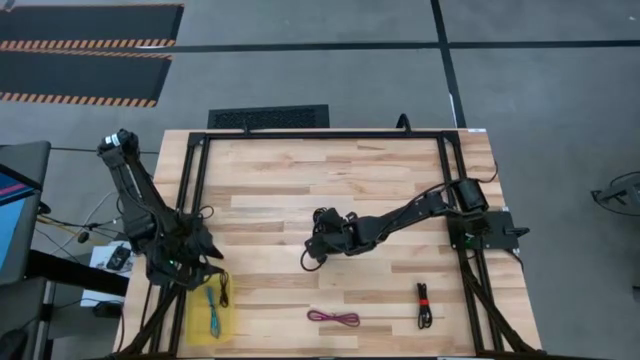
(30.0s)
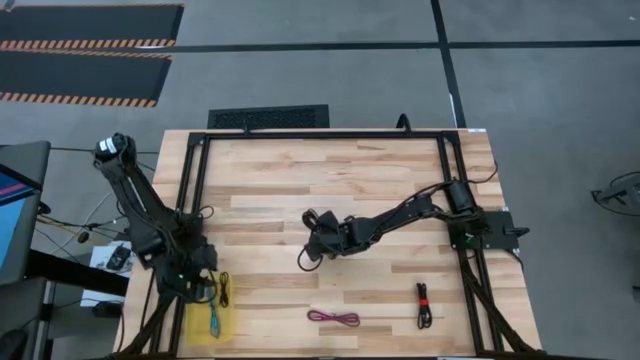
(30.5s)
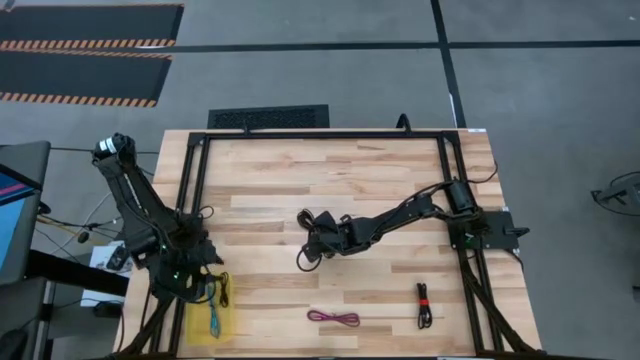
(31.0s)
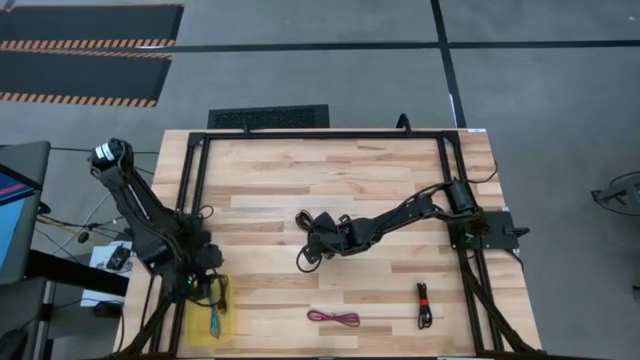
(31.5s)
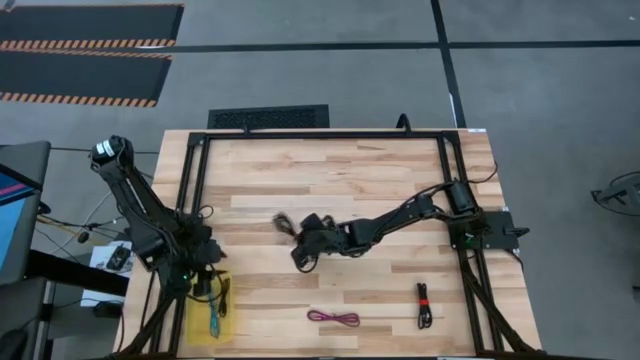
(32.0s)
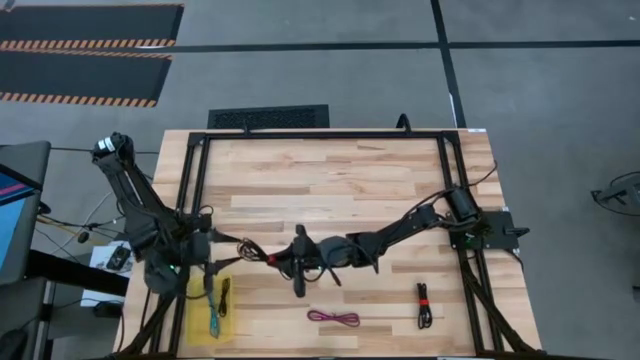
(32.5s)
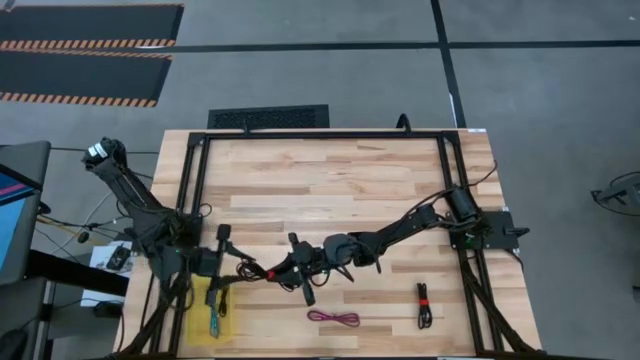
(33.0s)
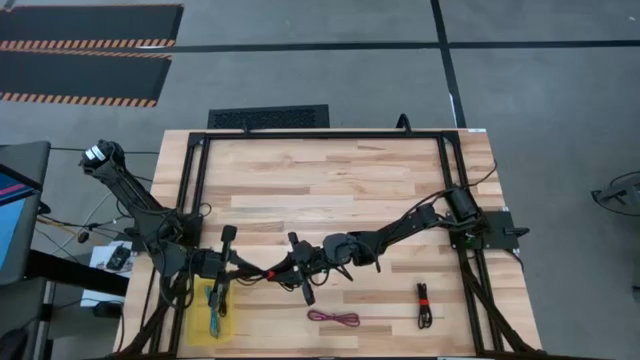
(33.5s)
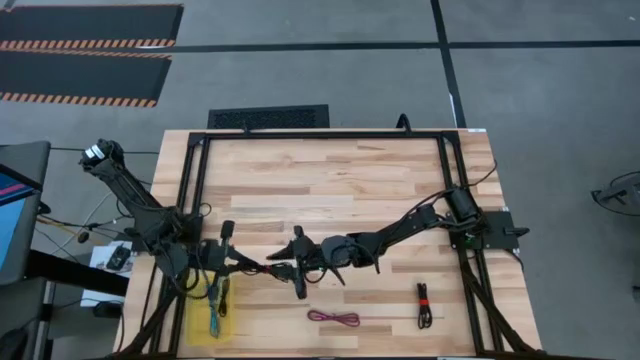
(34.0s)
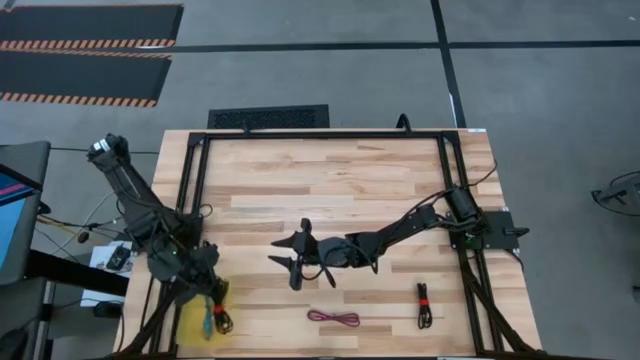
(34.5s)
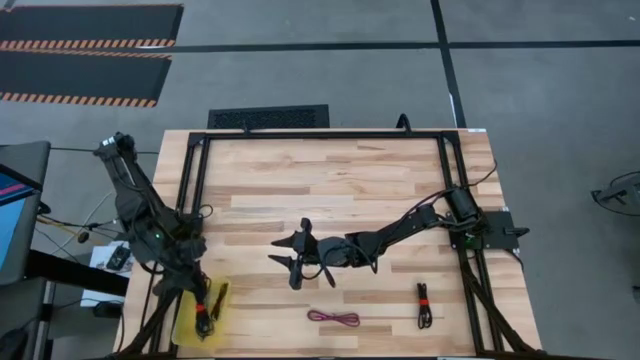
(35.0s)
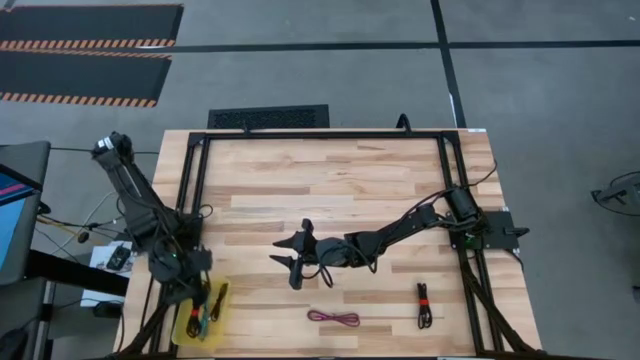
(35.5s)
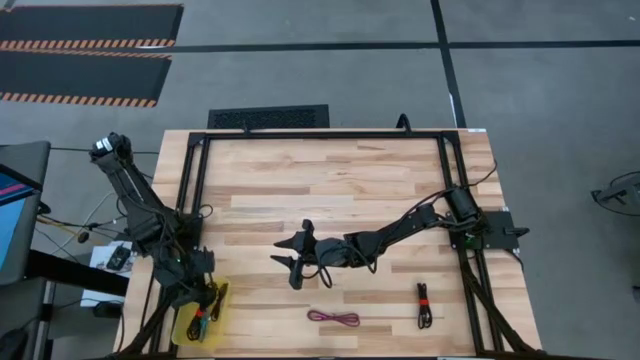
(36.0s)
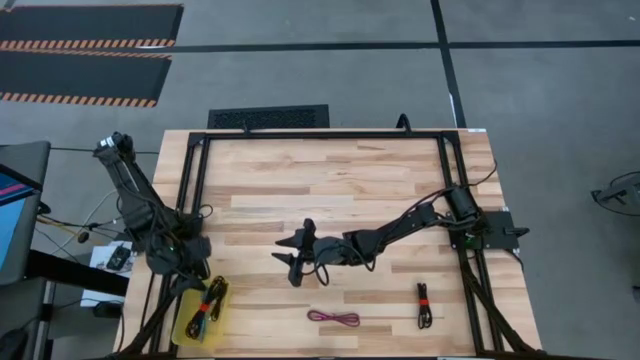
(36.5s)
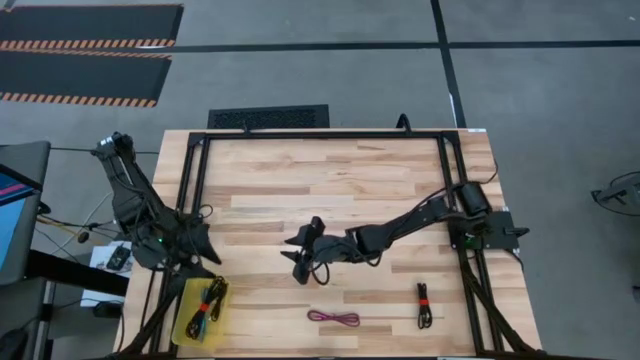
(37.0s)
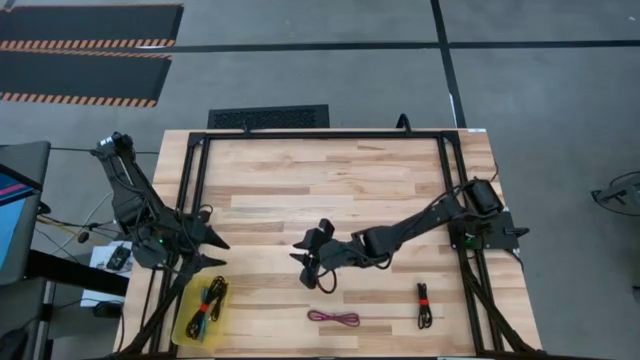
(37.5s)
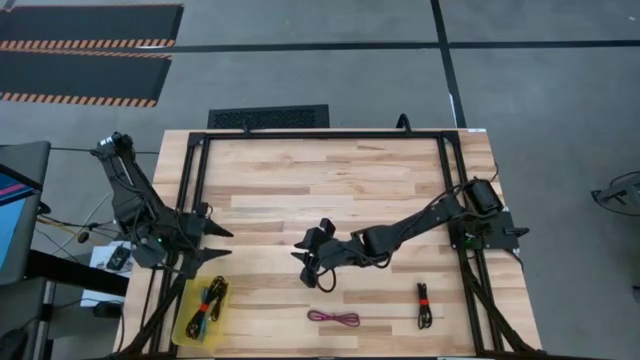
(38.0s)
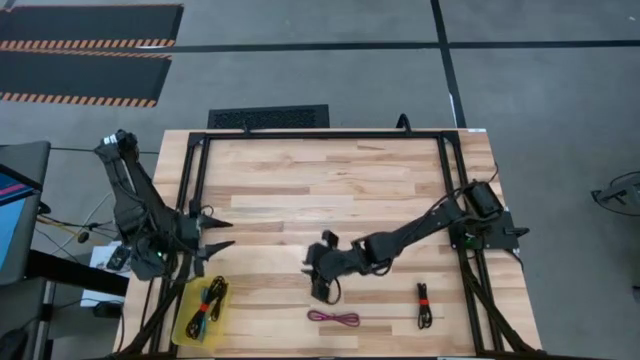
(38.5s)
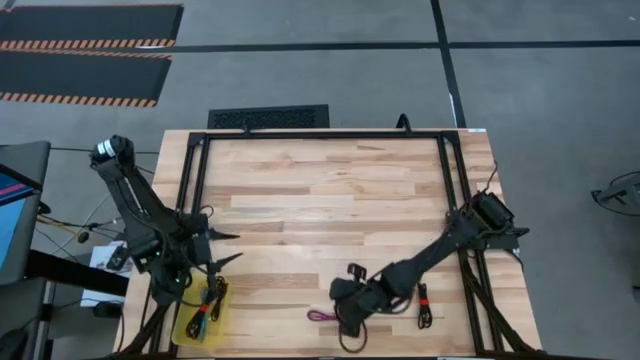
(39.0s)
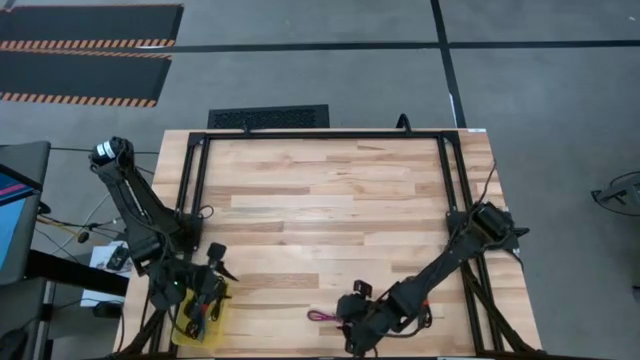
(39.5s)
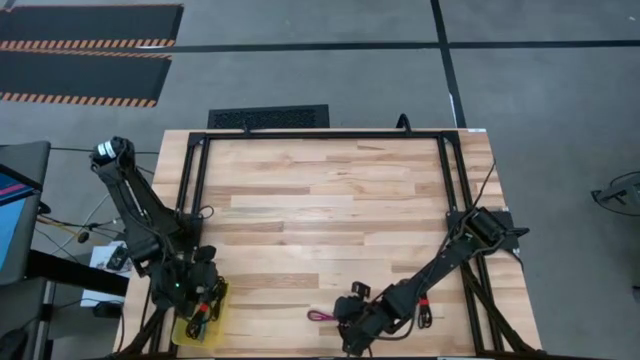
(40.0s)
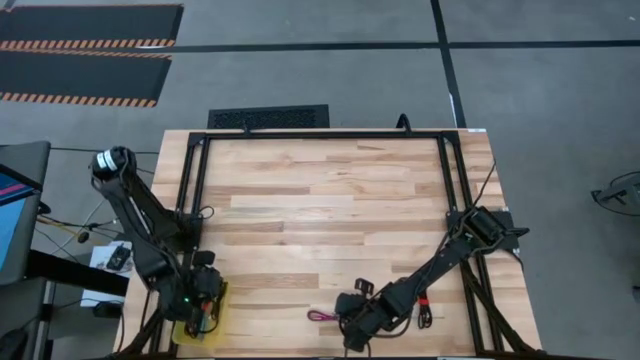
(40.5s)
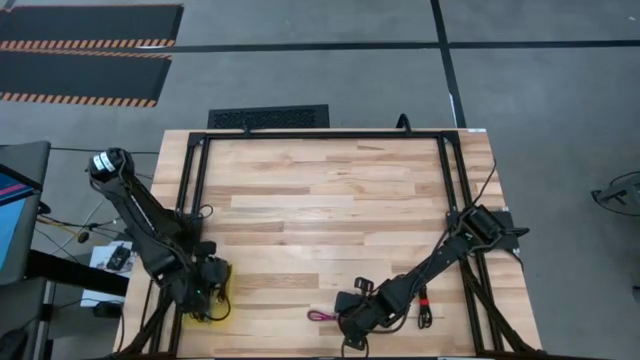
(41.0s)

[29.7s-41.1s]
Task: Pick and place USB-C Cables
Put the top black charger cable into the yellow bin

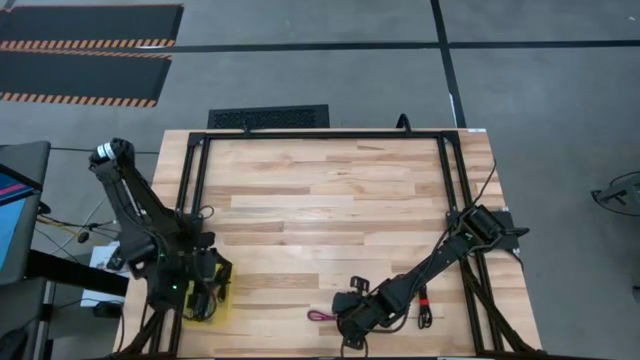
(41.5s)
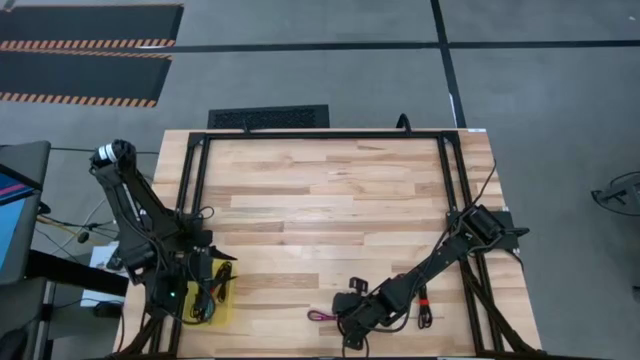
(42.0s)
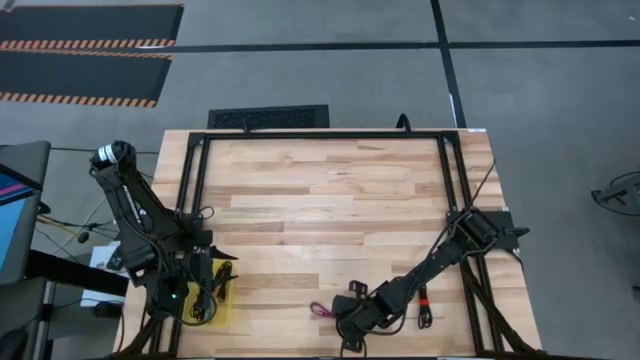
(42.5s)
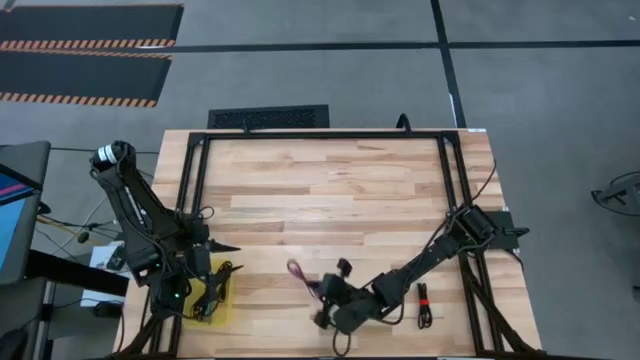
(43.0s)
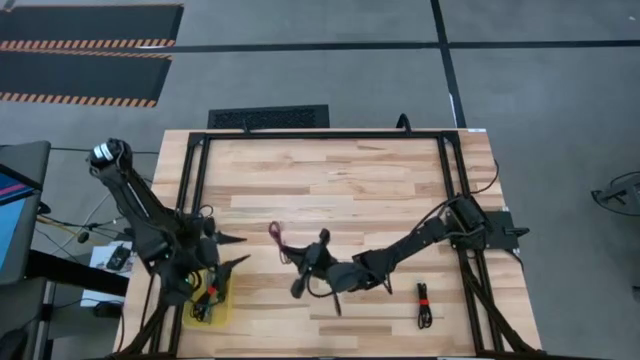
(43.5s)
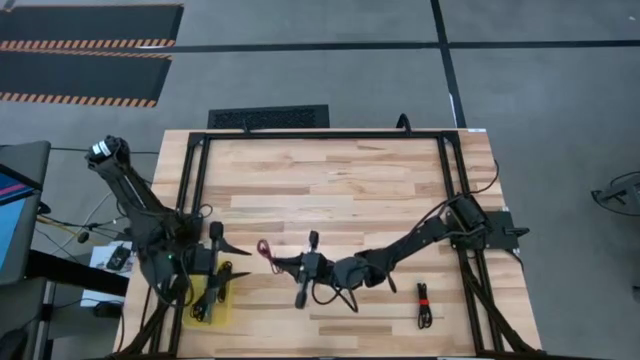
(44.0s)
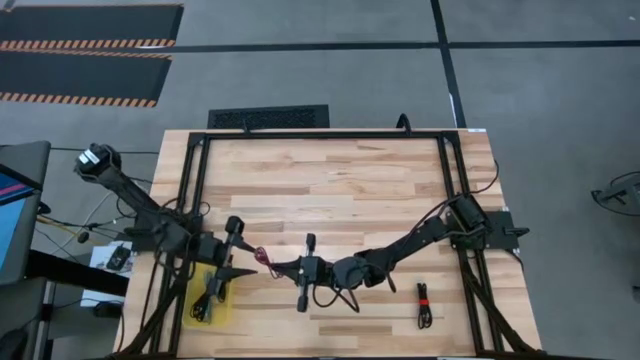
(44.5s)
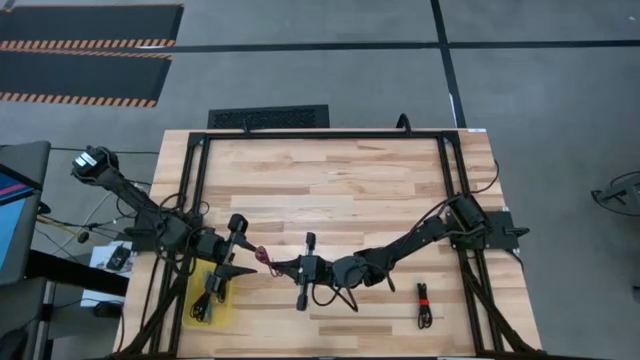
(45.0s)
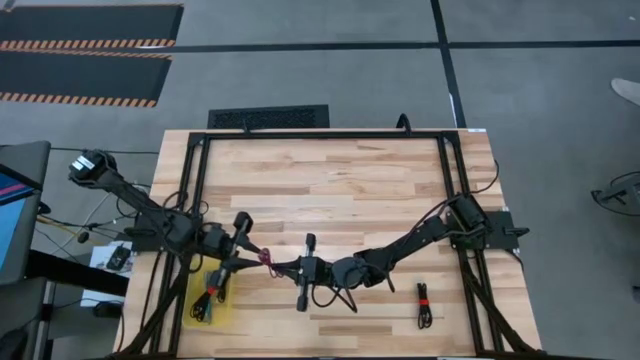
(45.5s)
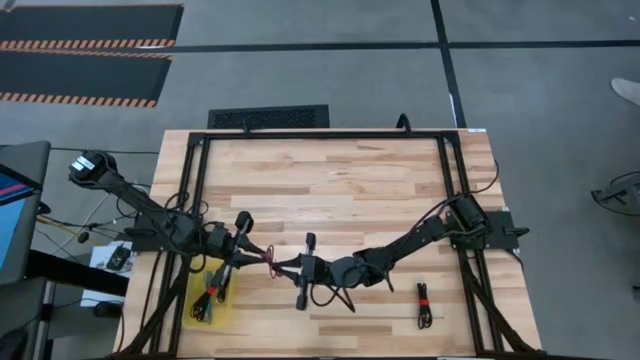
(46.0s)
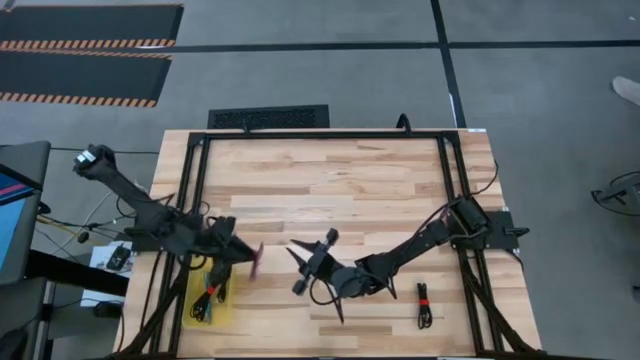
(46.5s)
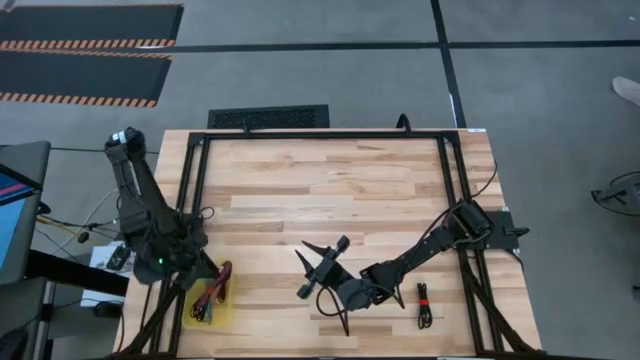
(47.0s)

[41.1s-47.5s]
Put the pink charger cable into the yellow bin

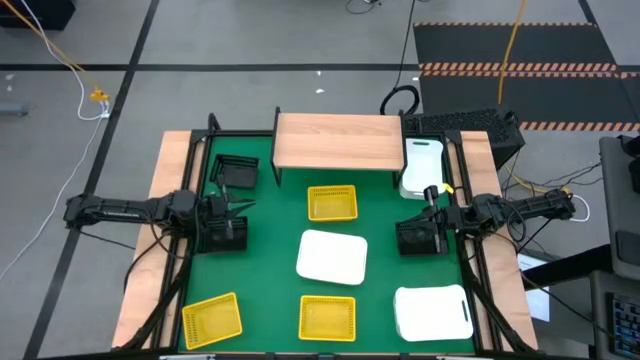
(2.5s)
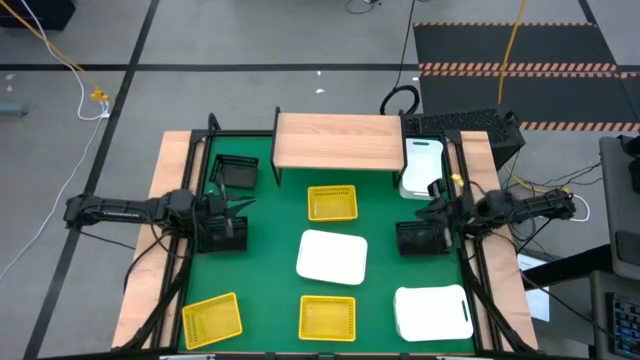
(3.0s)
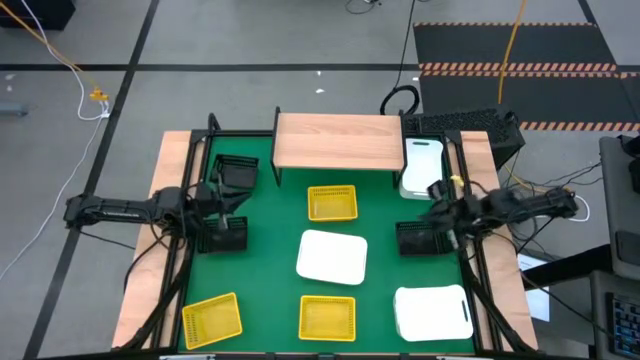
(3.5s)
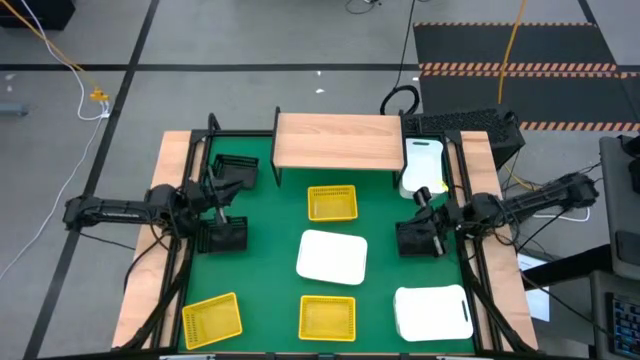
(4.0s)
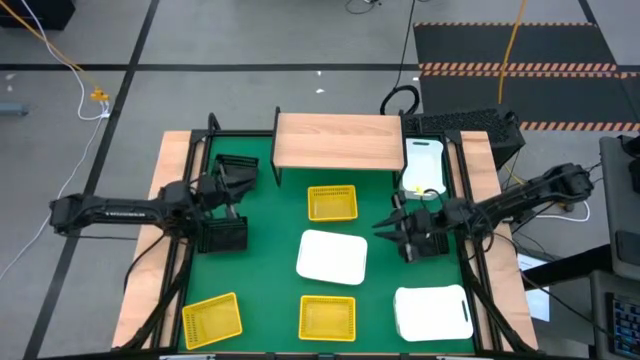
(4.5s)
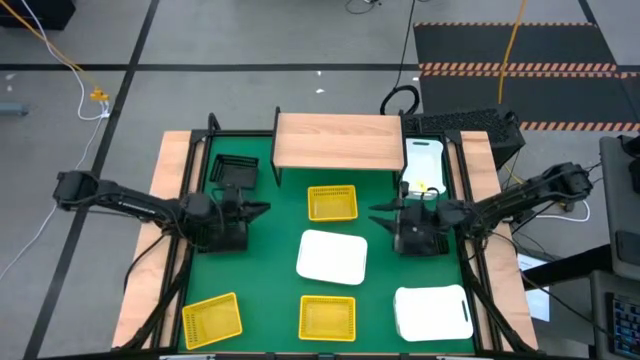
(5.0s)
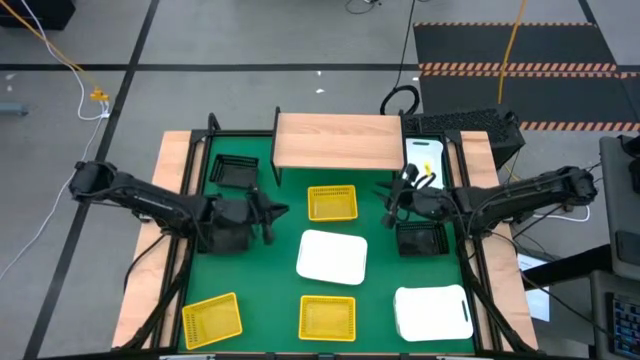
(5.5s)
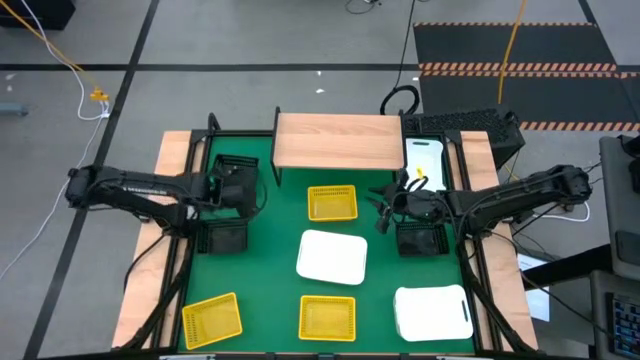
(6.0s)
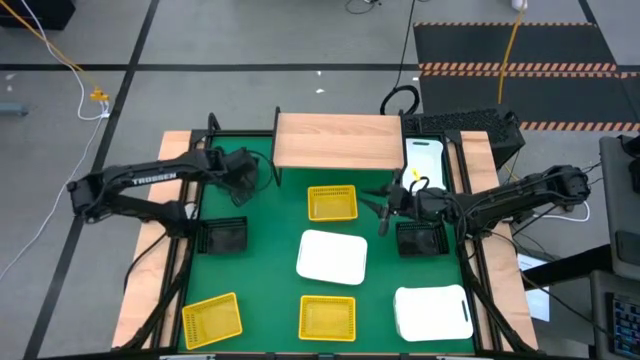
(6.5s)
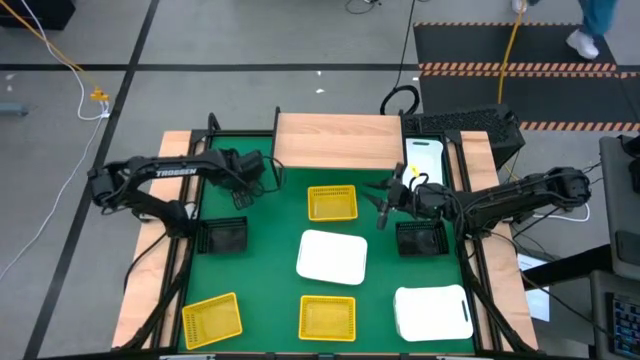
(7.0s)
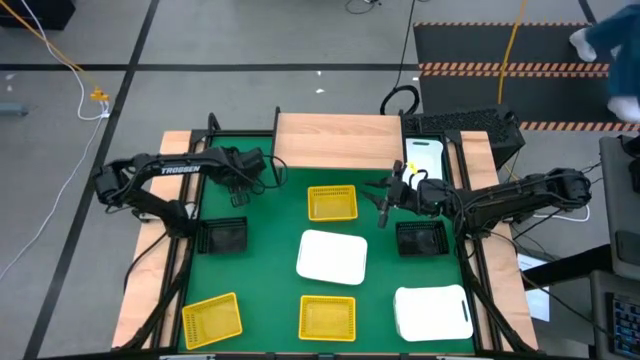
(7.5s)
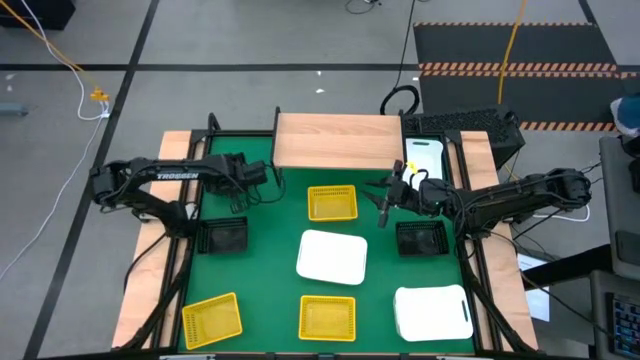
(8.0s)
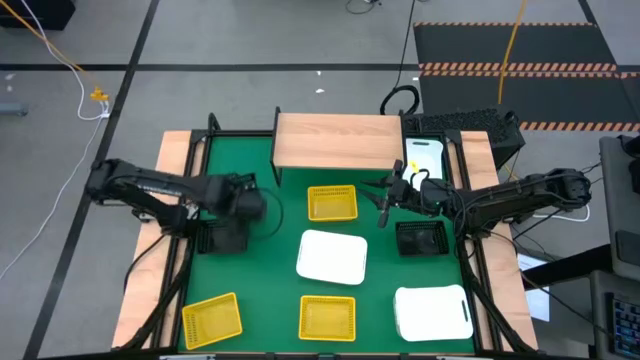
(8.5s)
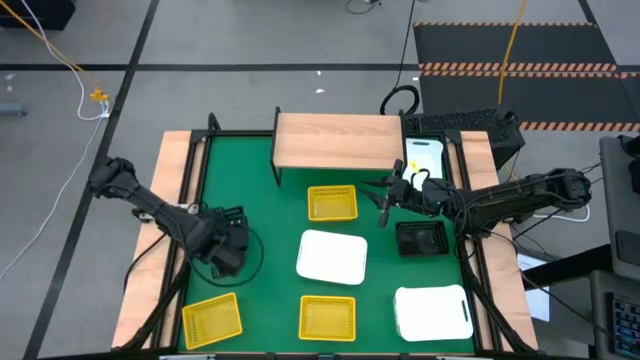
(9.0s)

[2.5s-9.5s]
Task: Stack baskets on shelf by color
Stack the top black bin on top of the bottom left black bin
